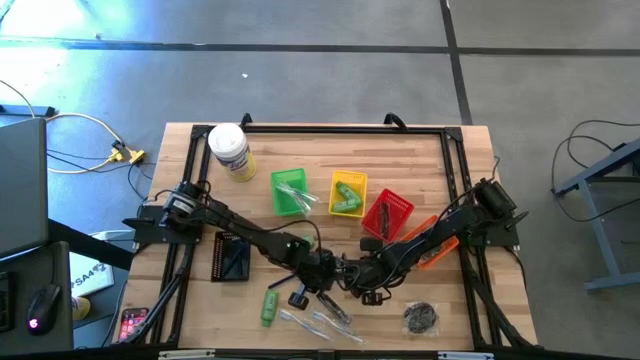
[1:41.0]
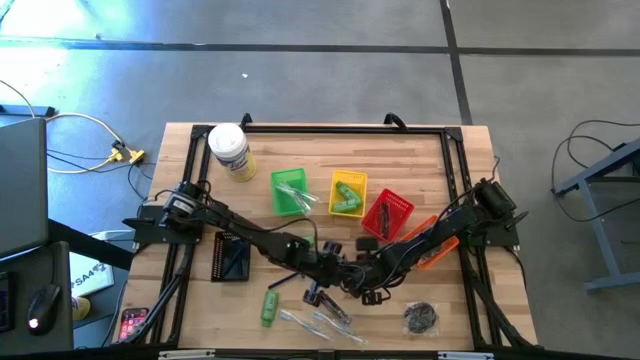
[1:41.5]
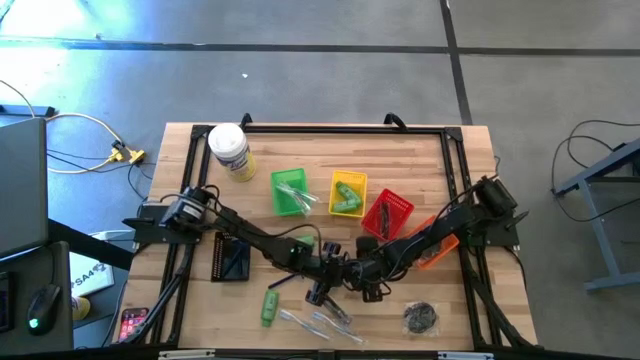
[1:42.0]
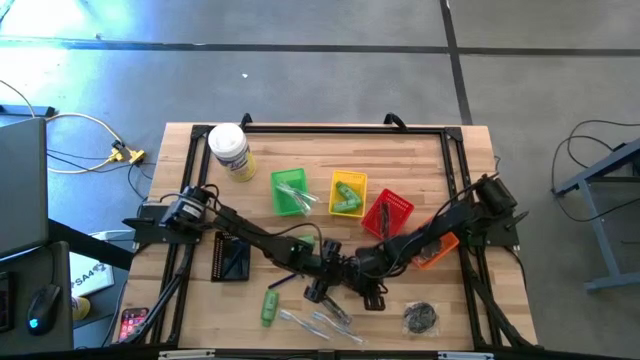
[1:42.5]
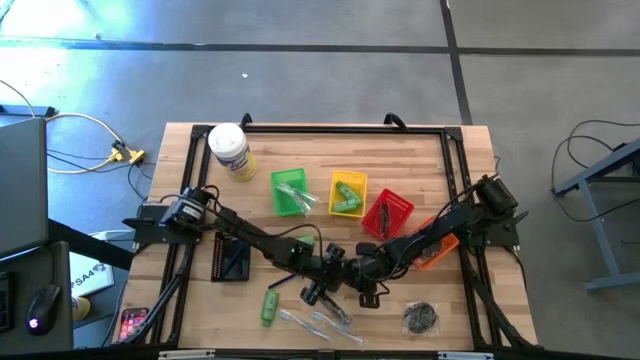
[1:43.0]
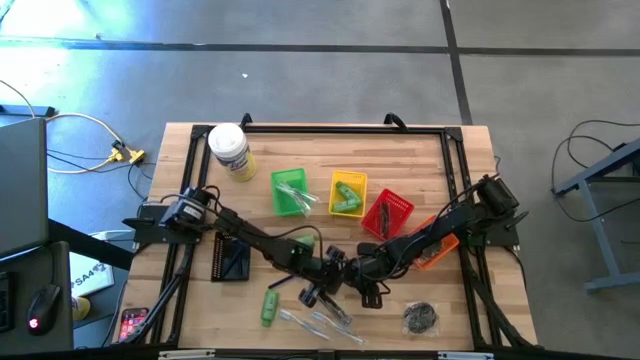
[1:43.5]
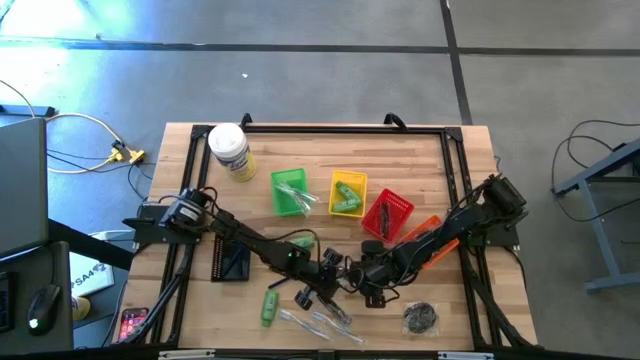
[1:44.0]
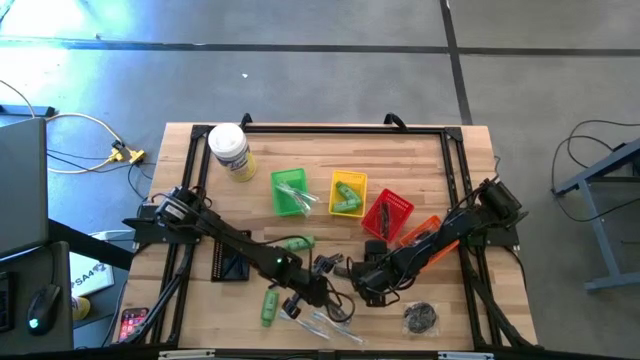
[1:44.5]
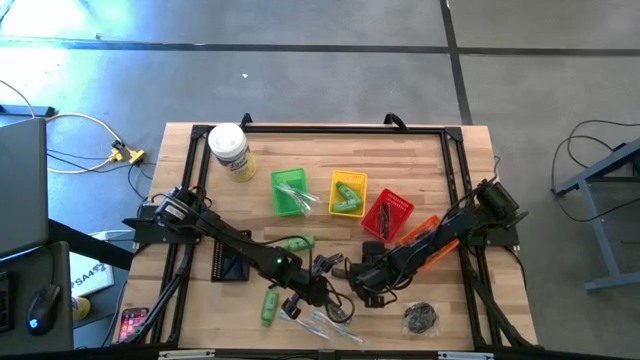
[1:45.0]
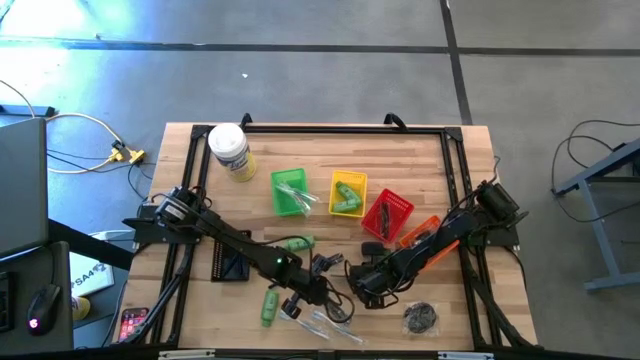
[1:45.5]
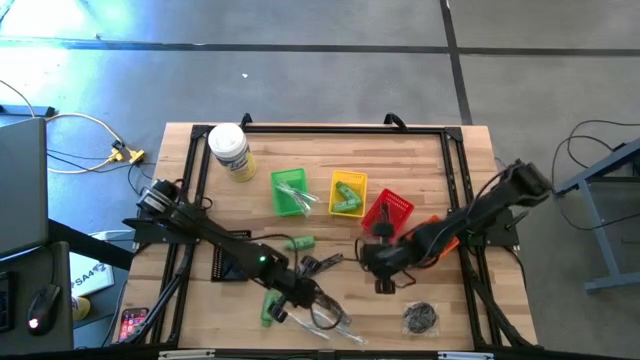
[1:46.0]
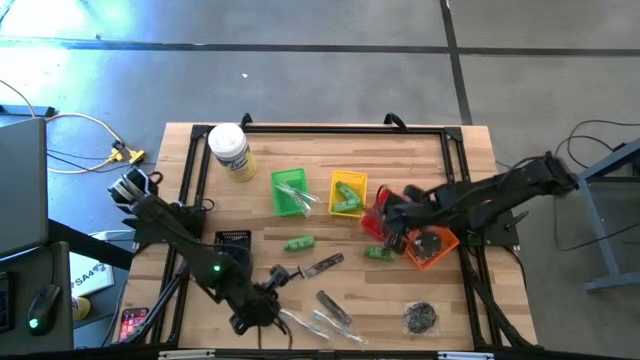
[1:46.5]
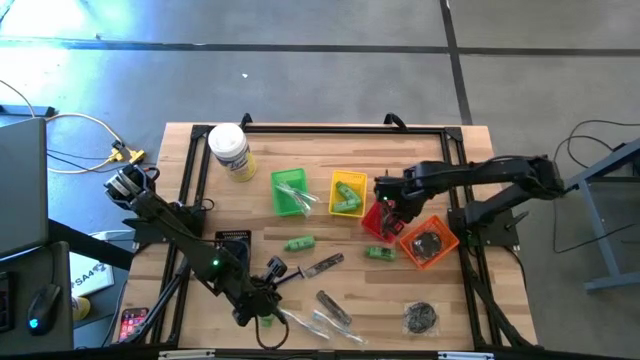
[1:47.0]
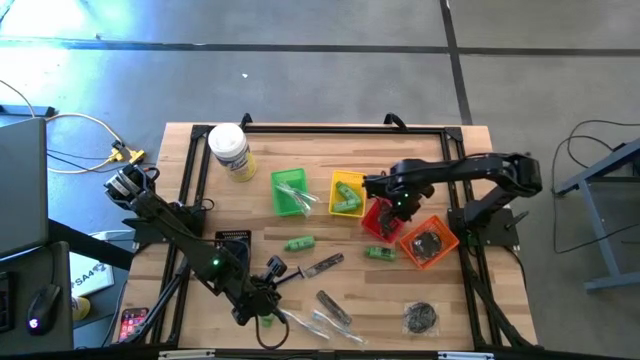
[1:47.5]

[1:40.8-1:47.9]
Task: Pick & Place Travel size toiletries
Put the black hair comb into the red bin

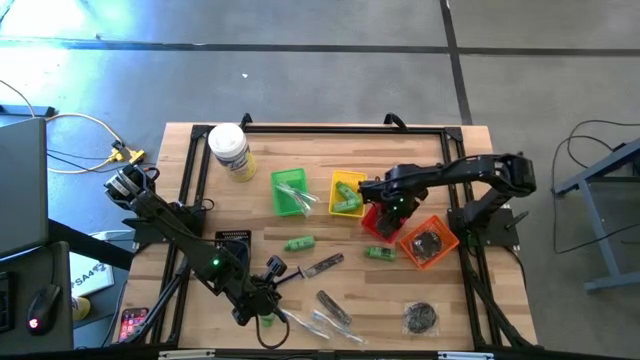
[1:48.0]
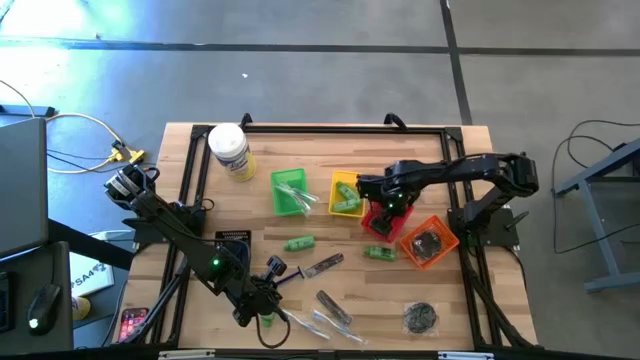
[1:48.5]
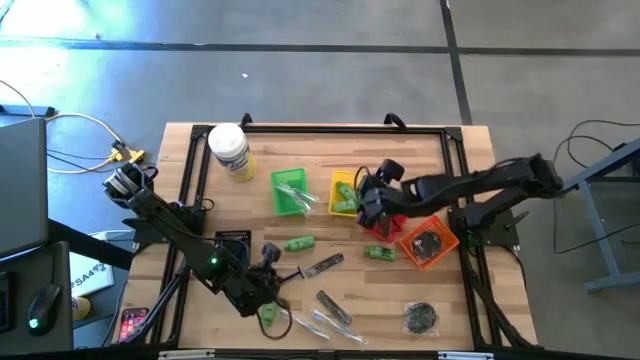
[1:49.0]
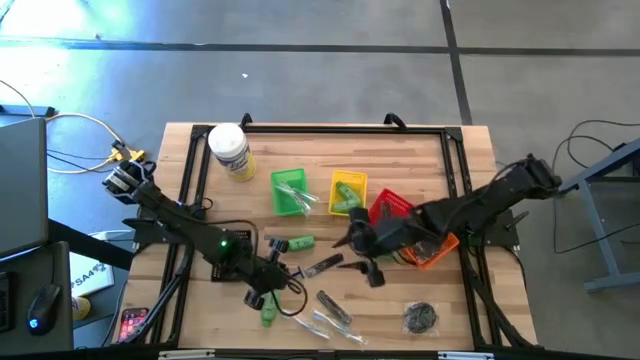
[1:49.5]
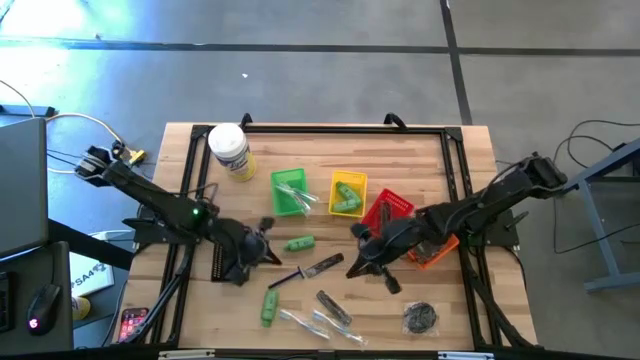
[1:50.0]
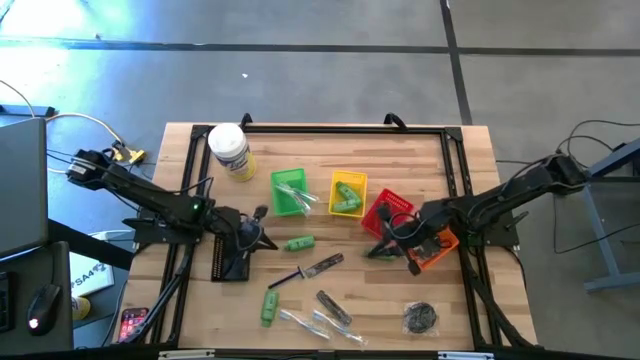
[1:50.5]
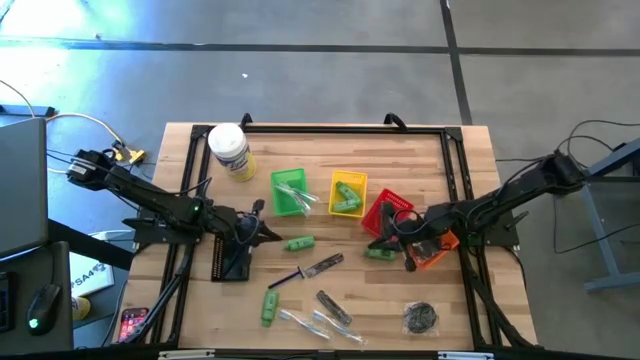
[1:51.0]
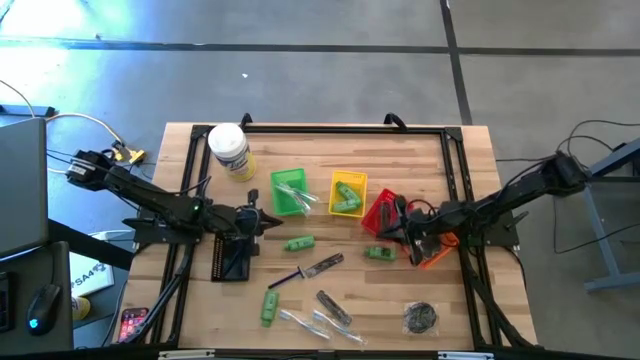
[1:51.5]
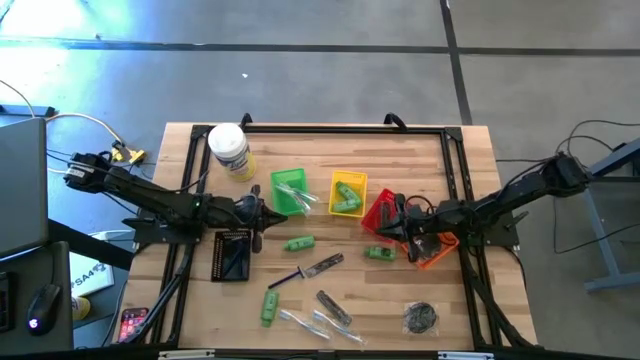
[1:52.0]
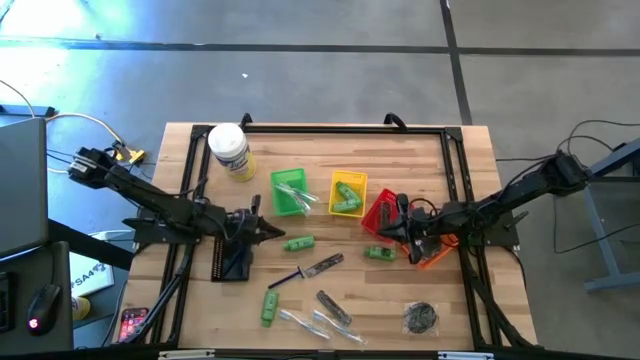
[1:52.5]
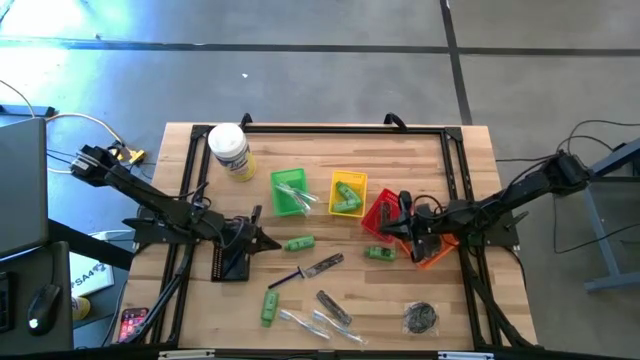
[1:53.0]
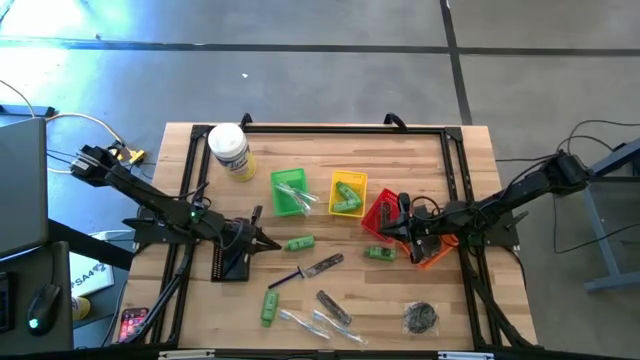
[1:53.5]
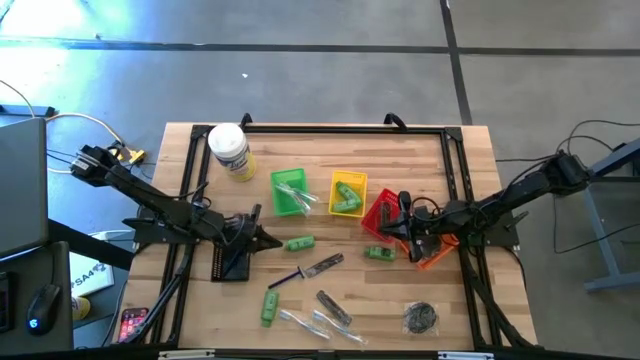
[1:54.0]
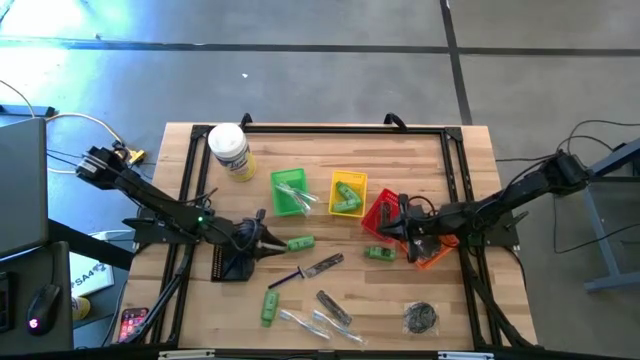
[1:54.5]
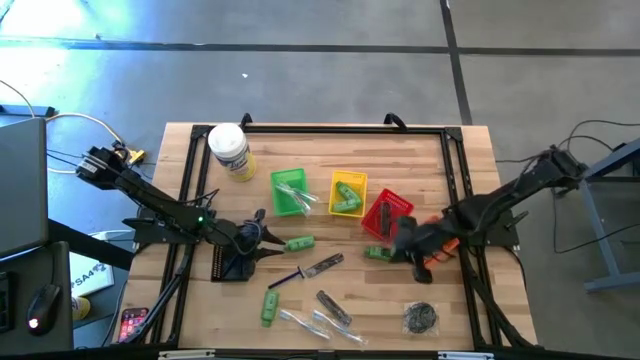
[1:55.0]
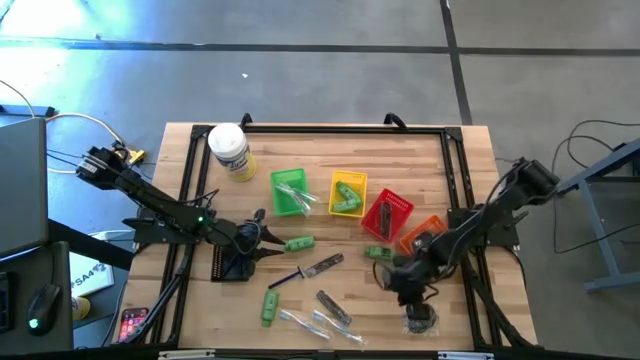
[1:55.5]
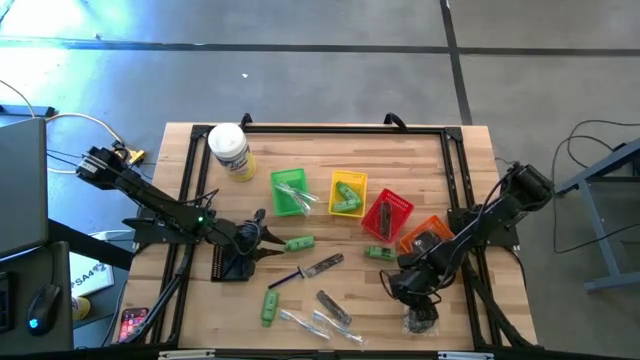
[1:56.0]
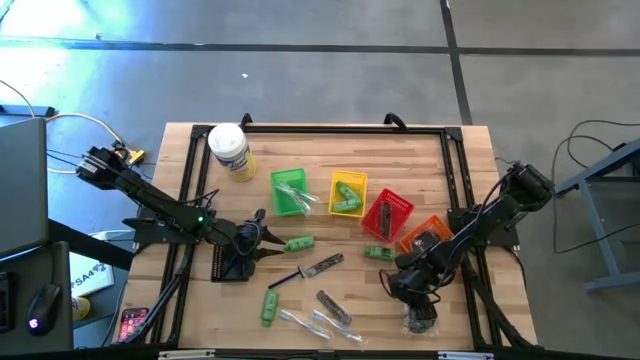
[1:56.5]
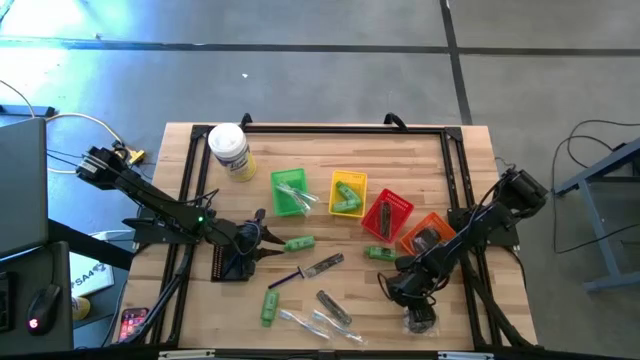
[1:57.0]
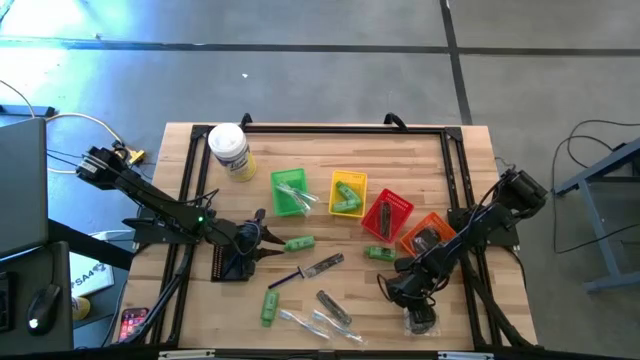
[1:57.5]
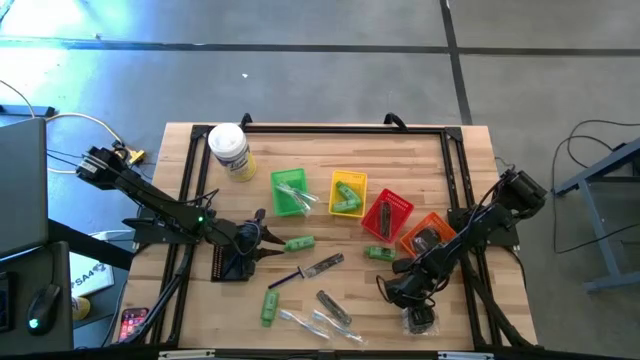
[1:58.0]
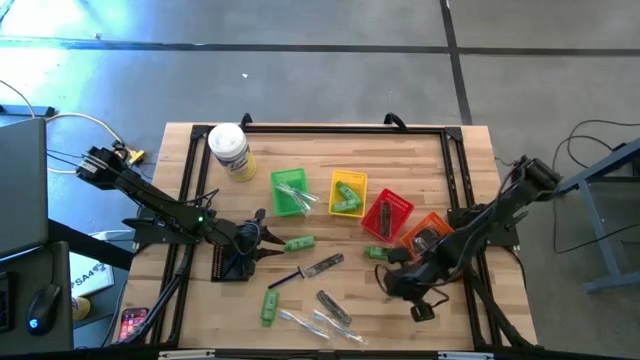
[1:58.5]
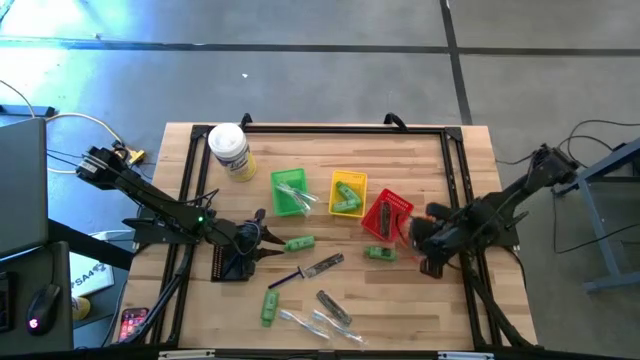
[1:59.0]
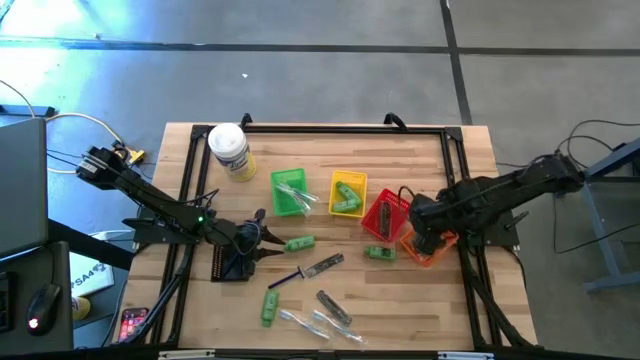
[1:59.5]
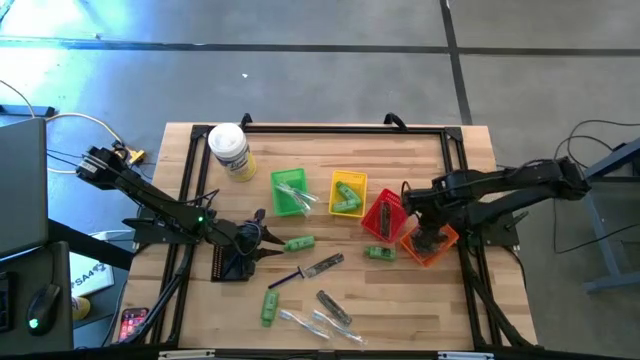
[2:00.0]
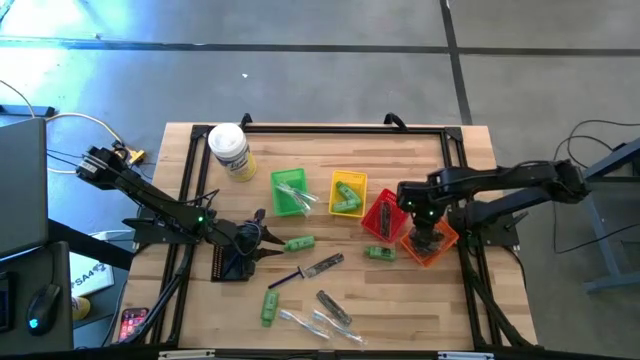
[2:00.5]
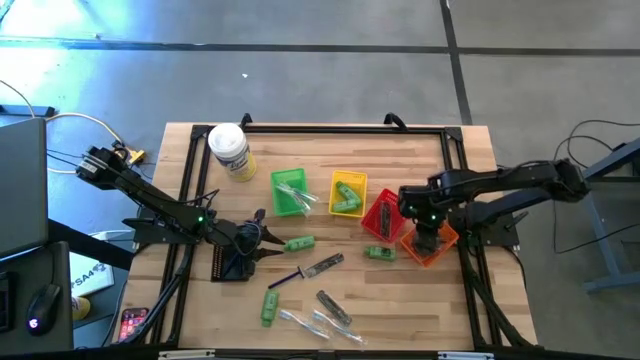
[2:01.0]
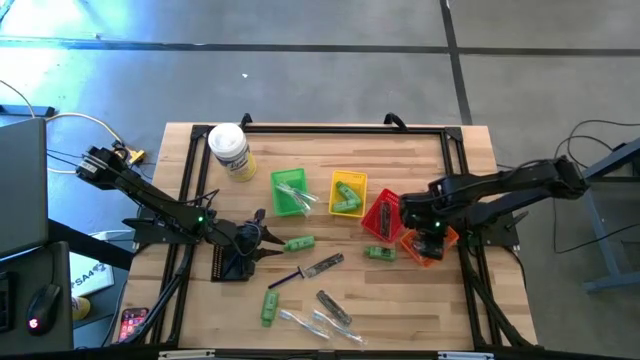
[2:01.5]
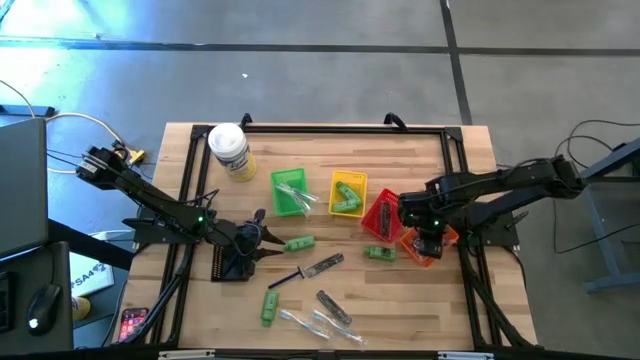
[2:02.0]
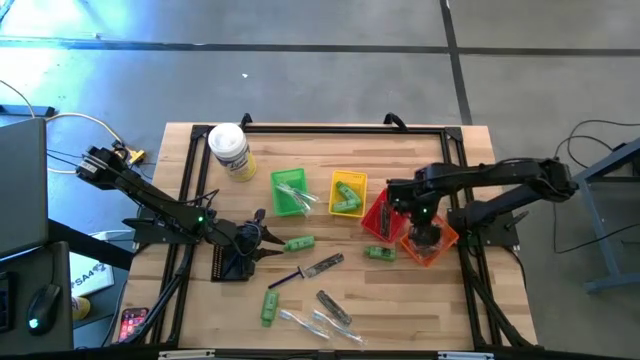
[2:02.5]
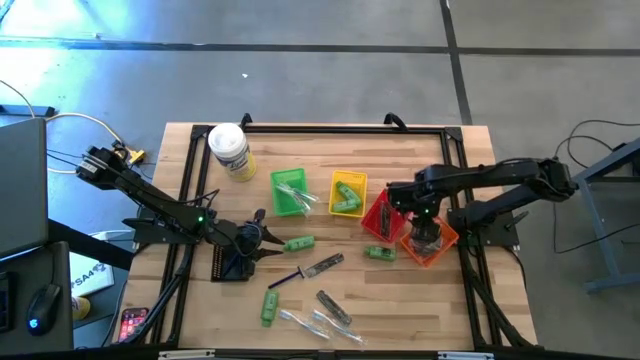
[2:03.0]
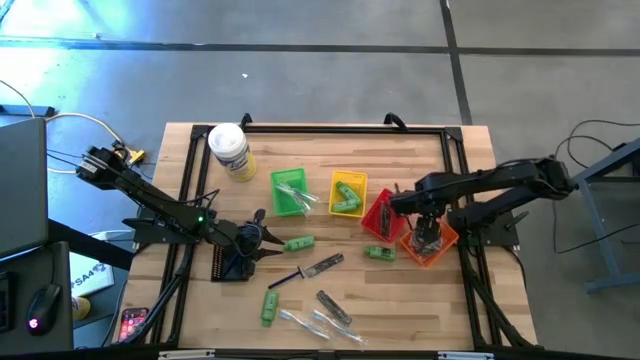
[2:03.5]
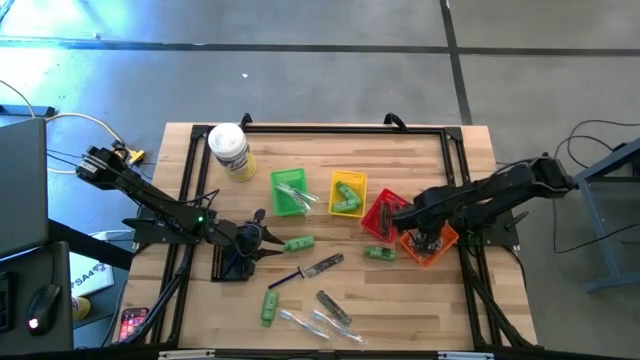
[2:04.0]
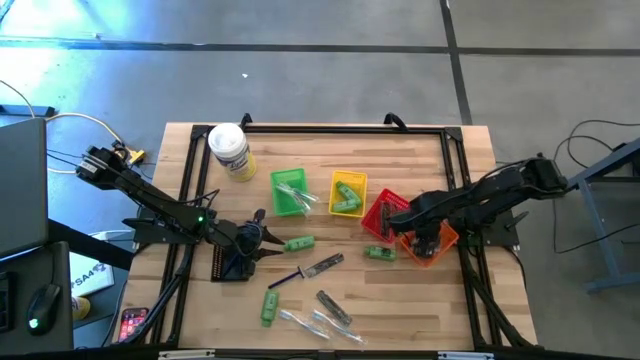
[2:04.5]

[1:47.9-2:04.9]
Put the black hairbrush into the orange bin
